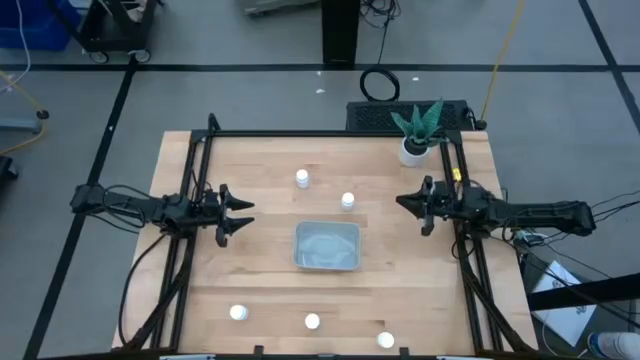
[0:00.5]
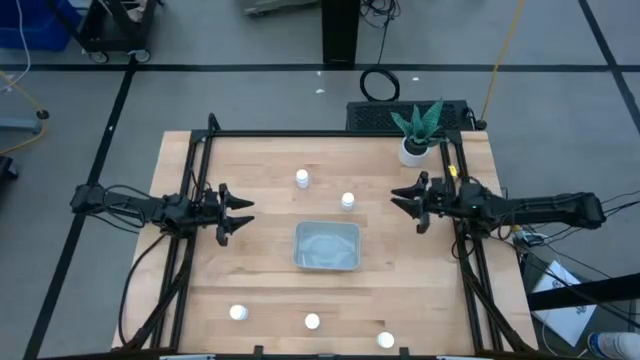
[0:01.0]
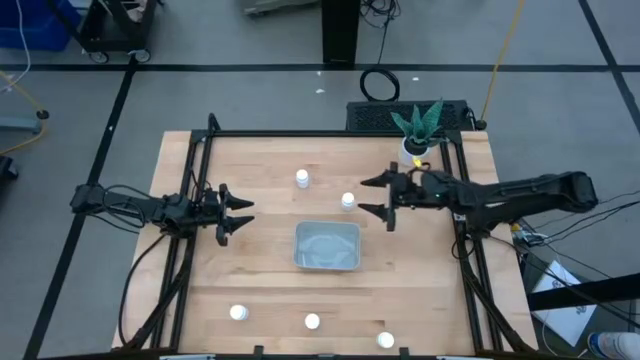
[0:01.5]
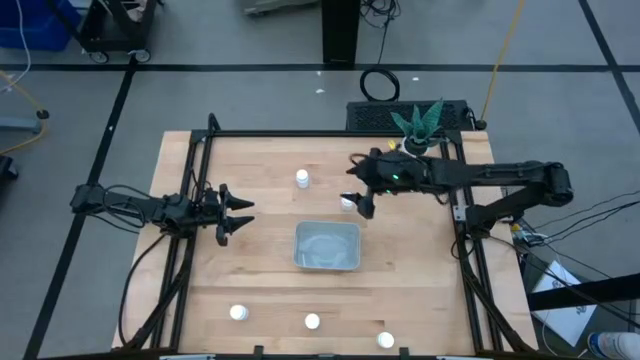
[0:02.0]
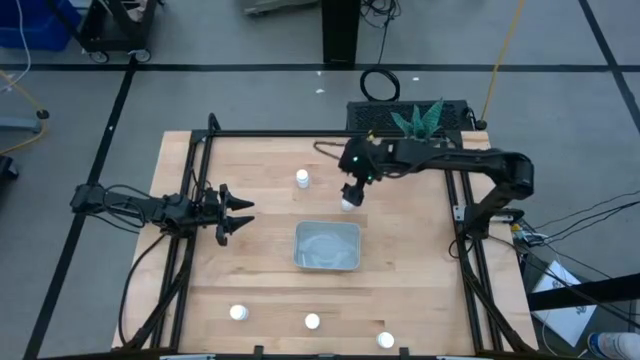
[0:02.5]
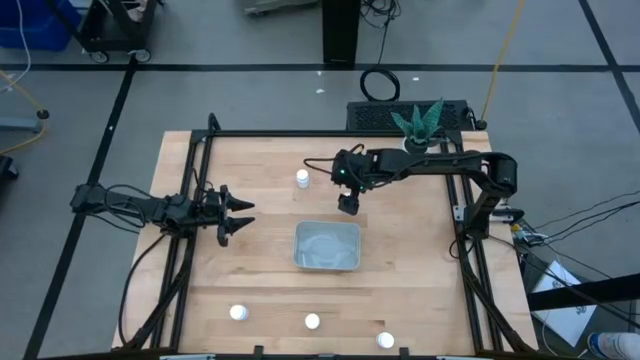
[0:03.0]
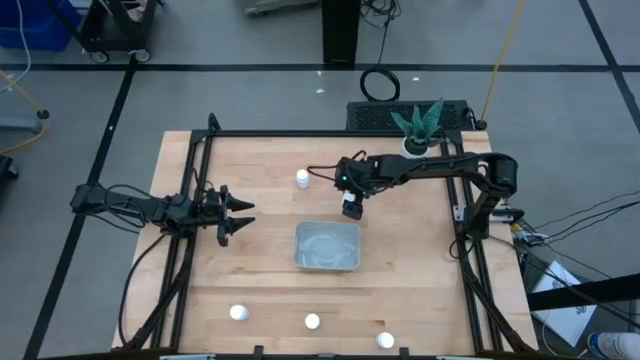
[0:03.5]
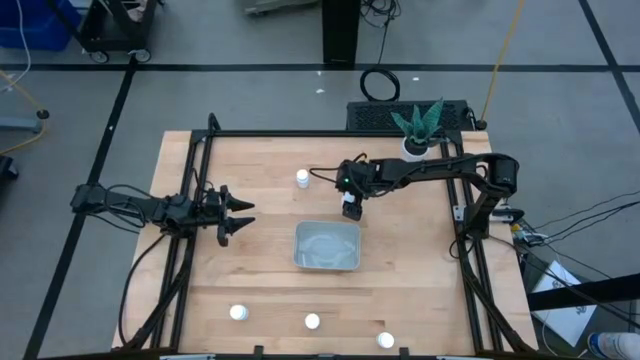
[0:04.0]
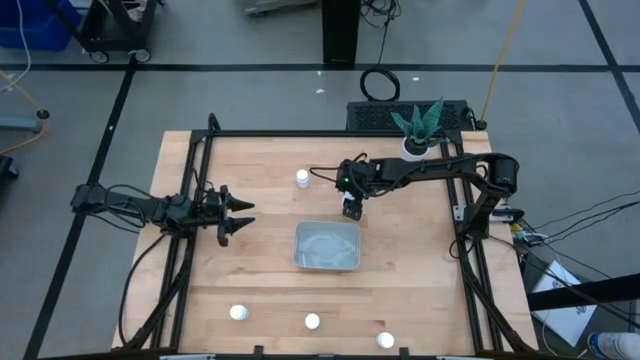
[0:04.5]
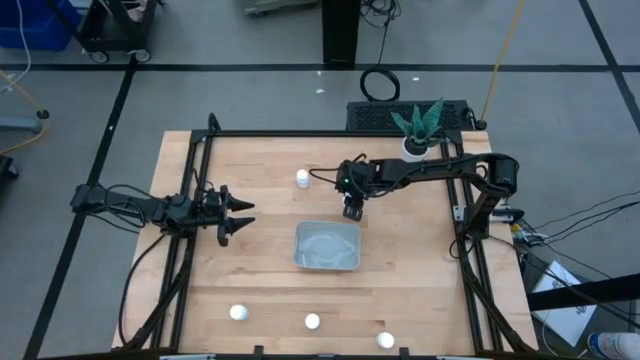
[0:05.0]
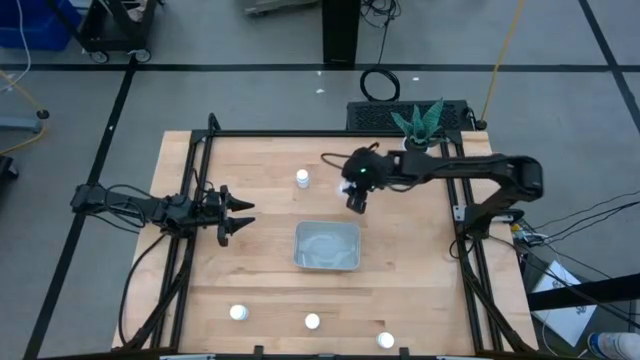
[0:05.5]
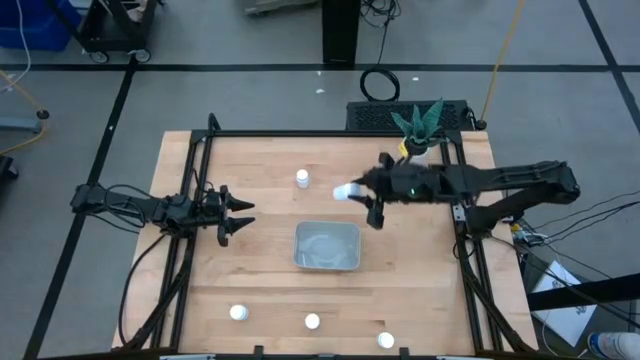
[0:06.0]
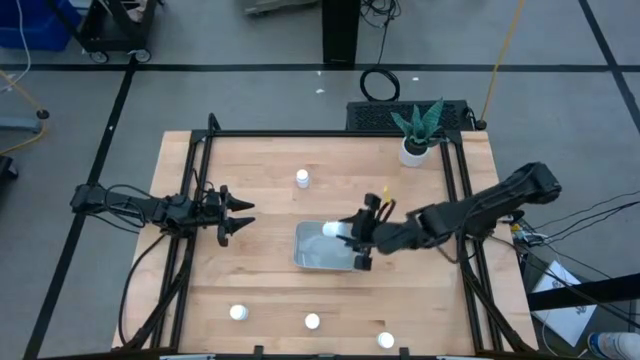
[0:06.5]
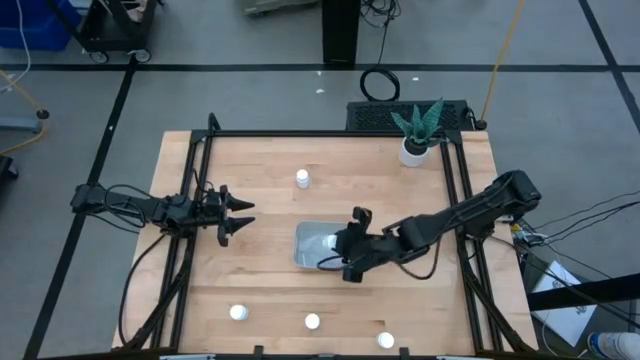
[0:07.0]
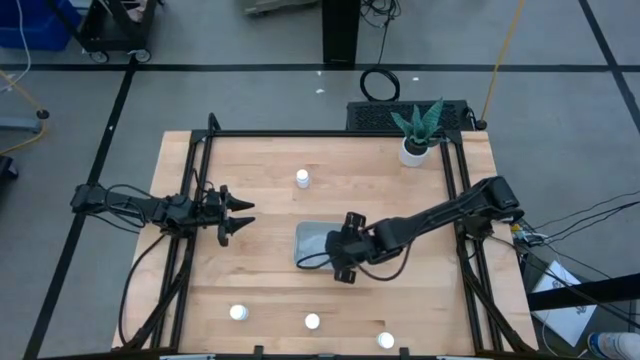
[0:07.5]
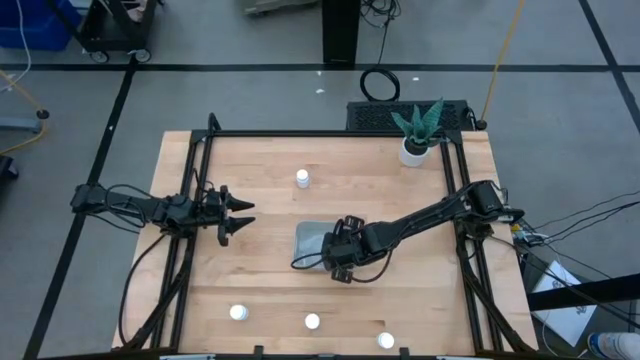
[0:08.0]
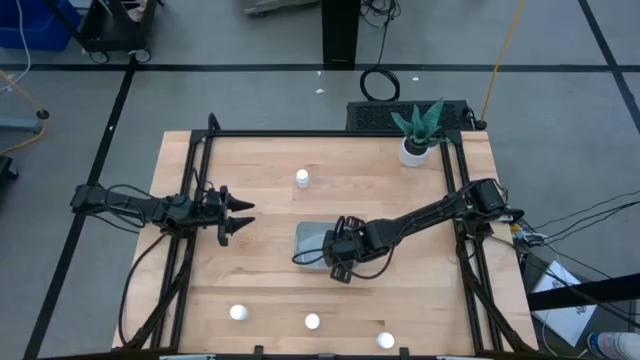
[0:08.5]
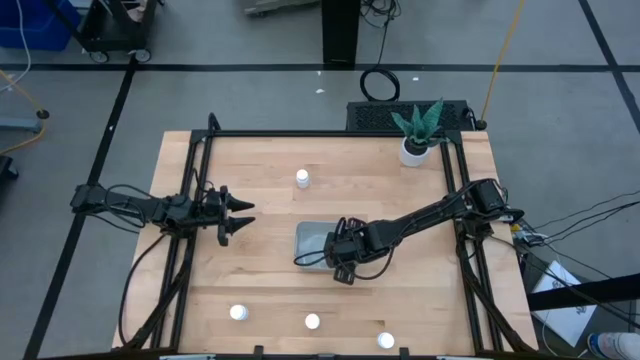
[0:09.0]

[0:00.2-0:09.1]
Task: Pick and place pill bottles into a basket
Put the pill bottle into the bin

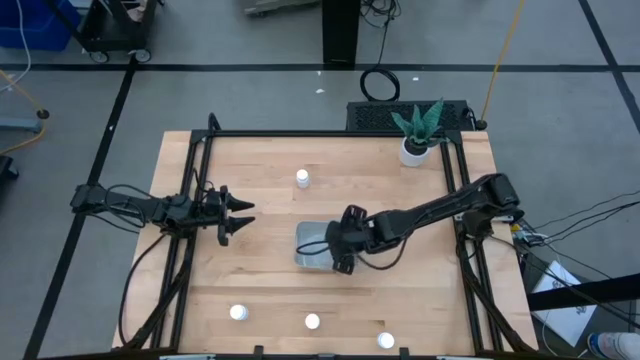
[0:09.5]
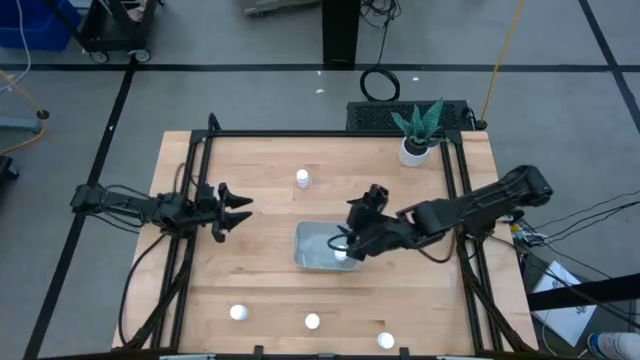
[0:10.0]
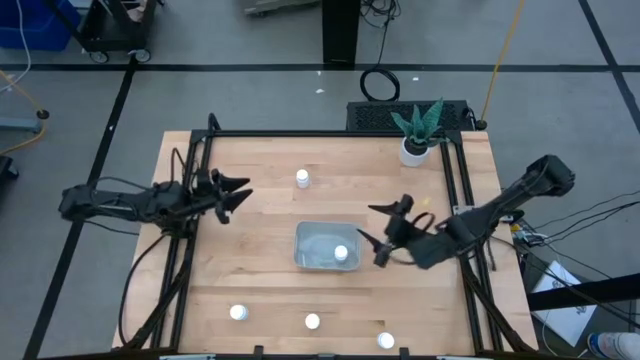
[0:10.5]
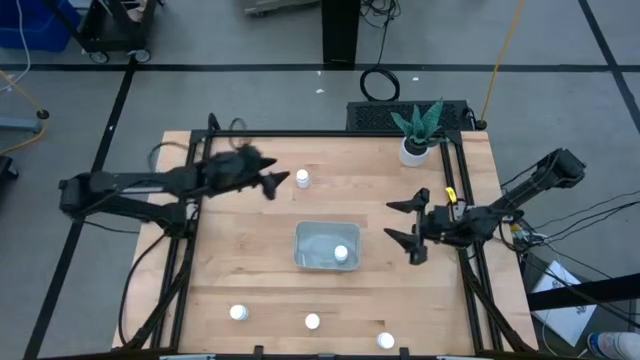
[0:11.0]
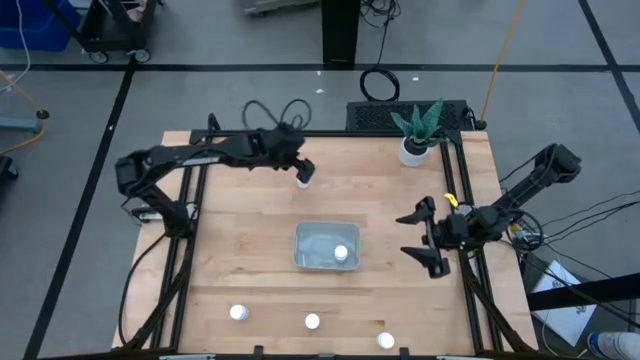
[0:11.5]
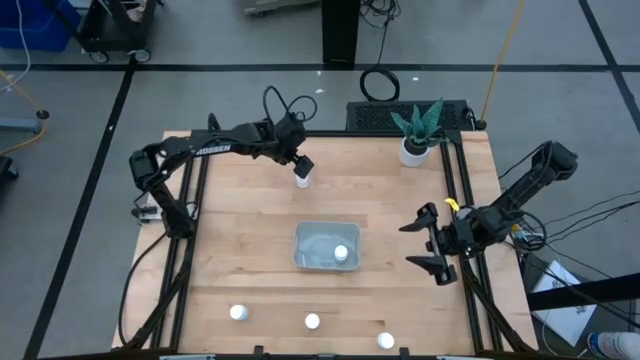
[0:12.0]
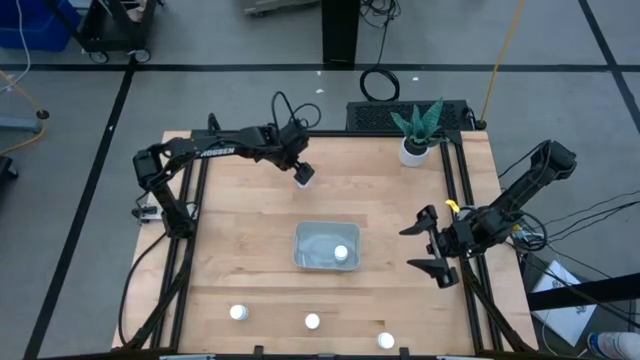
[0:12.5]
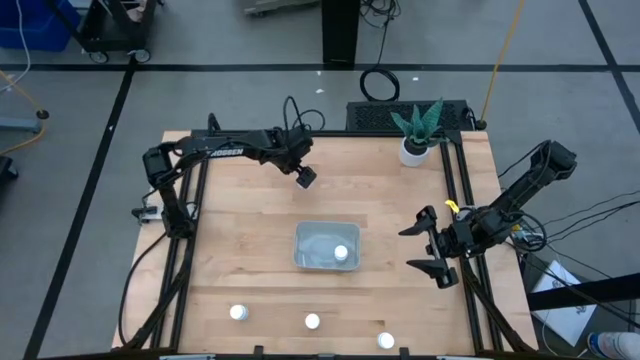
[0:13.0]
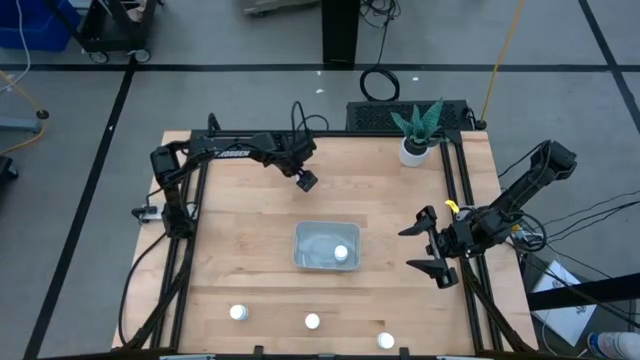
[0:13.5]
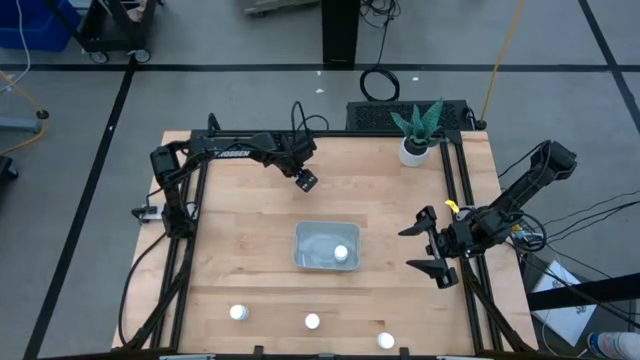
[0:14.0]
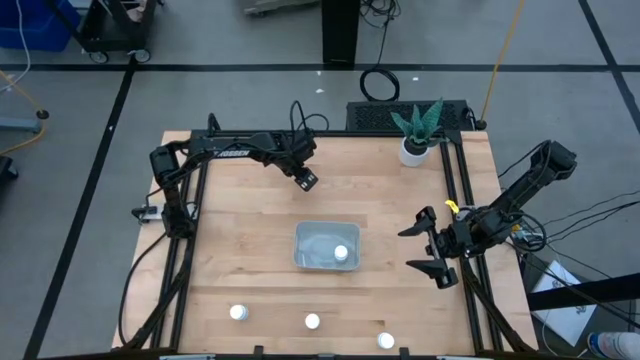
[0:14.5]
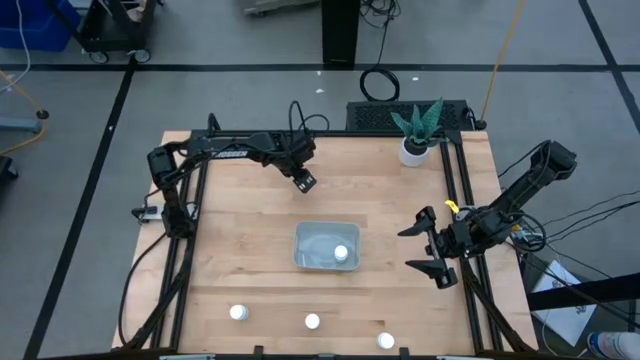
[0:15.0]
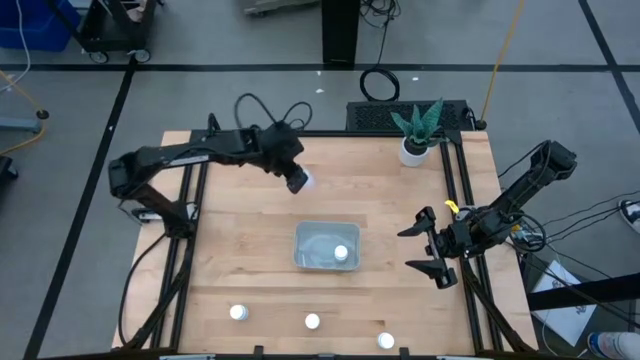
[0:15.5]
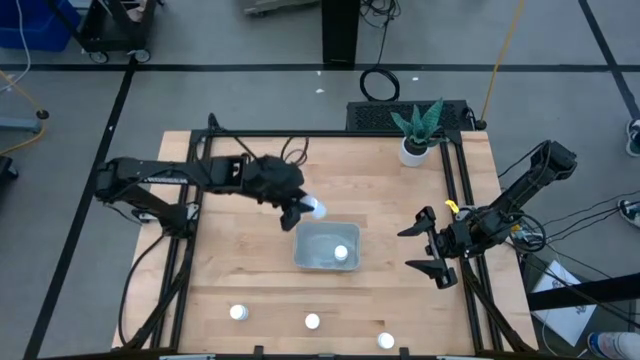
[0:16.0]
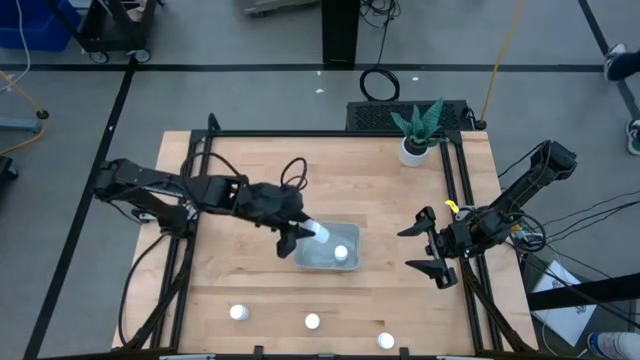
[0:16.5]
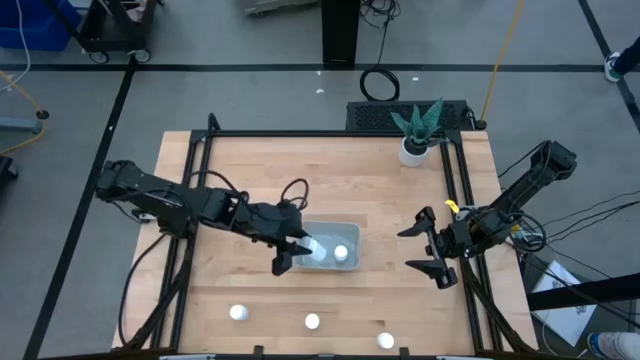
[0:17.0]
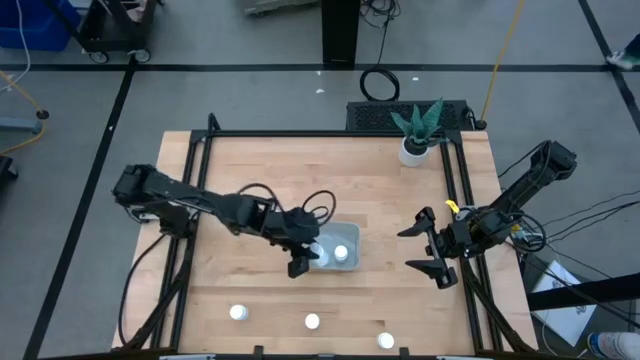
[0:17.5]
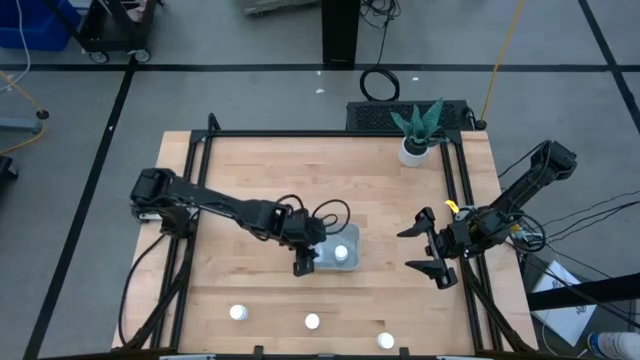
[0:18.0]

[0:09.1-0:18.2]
Put the pill bottle into the bin

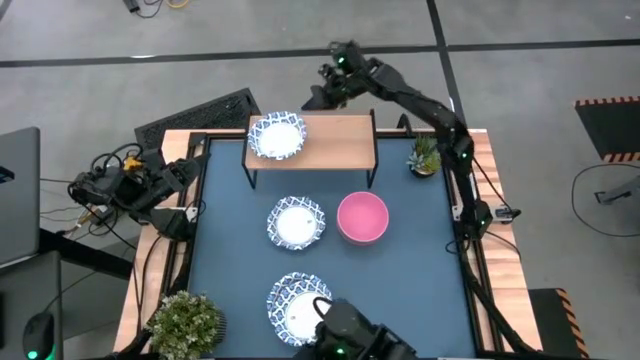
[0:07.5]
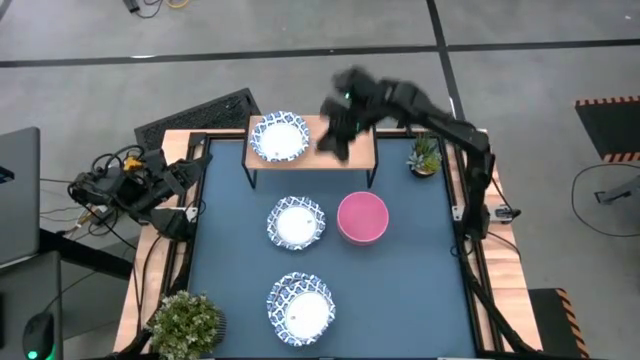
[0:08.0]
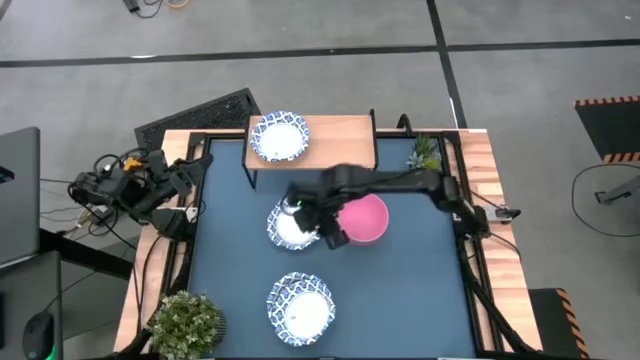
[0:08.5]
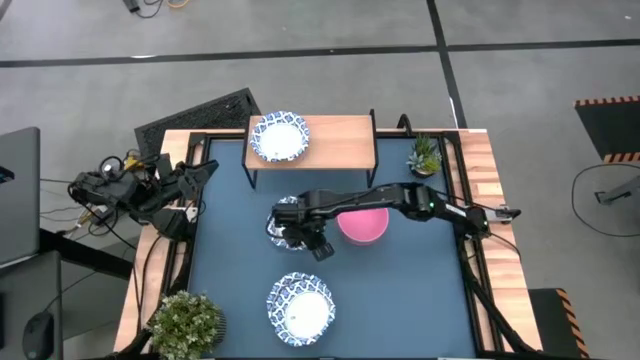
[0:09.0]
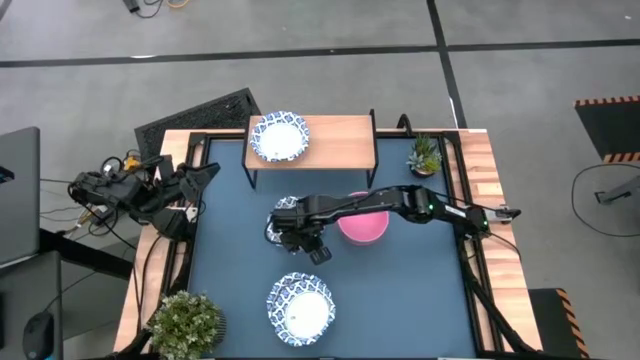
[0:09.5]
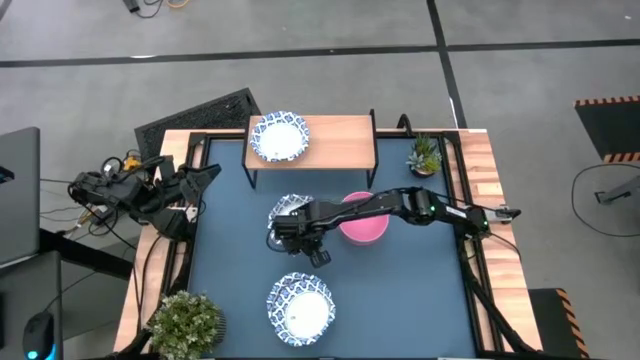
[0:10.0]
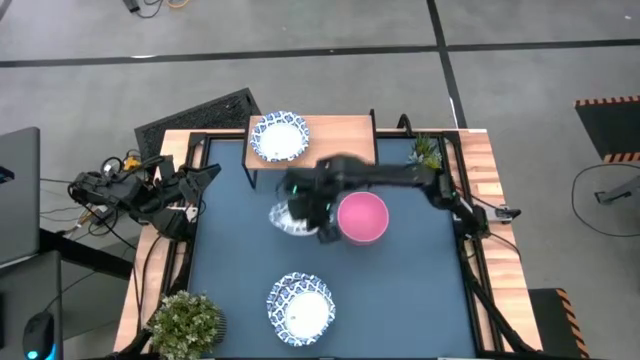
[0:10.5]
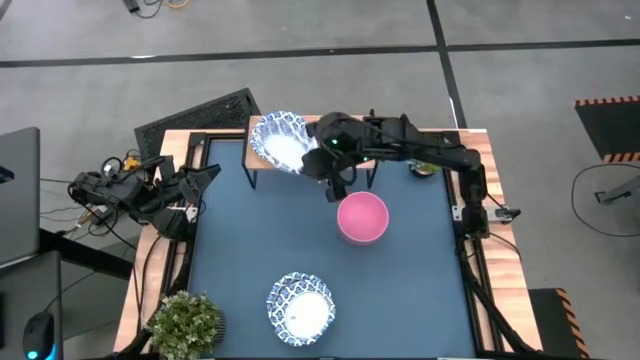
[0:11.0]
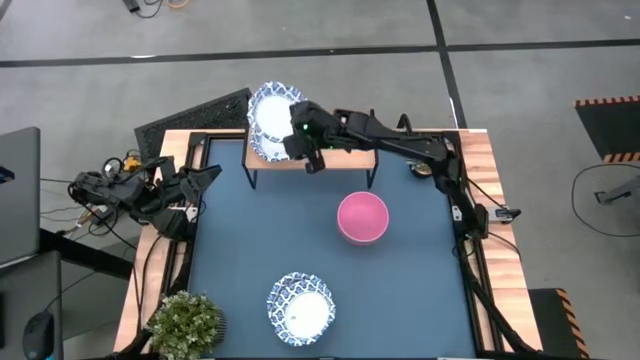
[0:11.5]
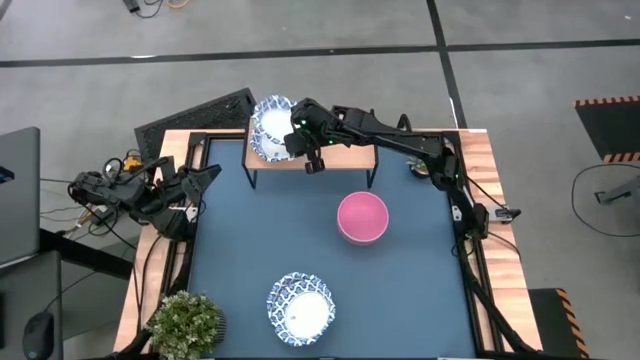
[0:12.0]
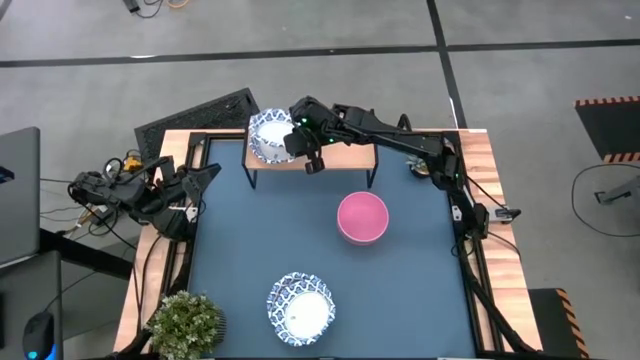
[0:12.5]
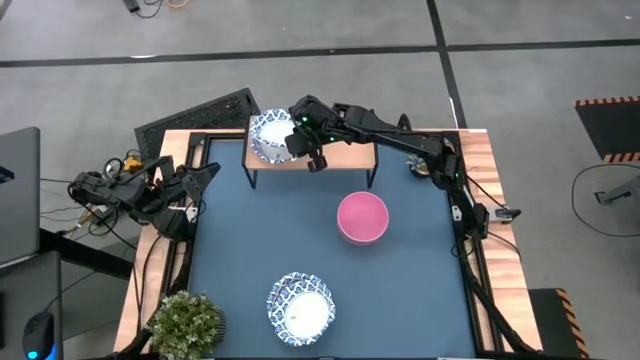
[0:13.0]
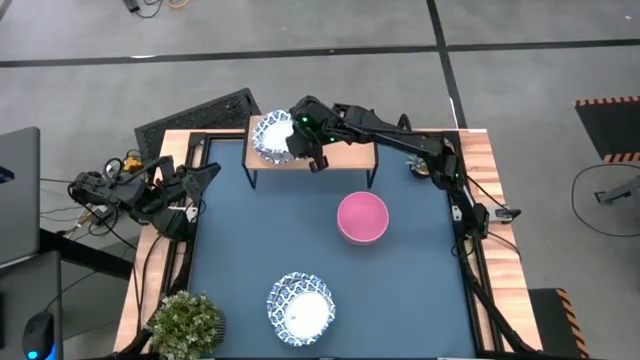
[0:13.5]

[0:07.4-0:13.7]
Task: Place and stack bowls onto a shelf
Stack the white bowl on top of the white bowl on the shelf
